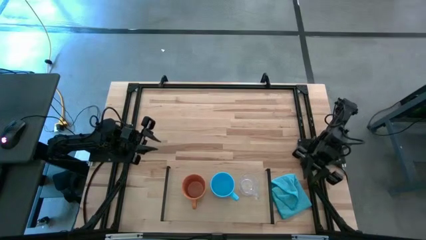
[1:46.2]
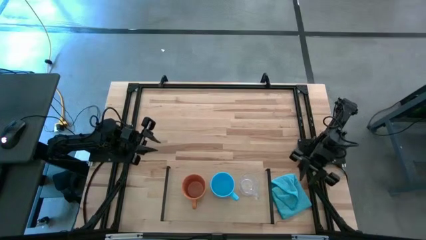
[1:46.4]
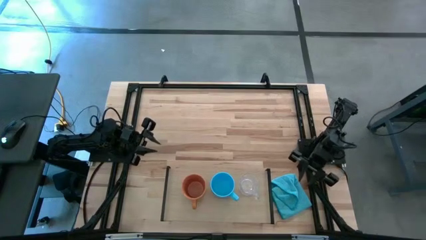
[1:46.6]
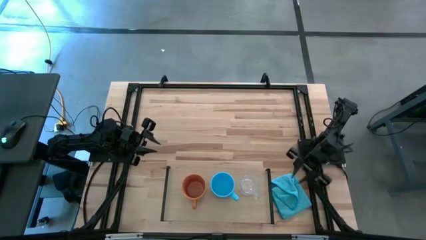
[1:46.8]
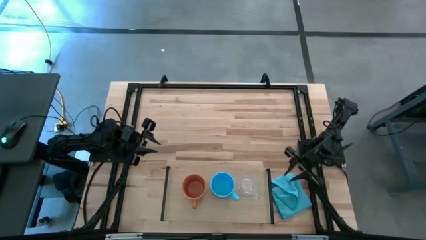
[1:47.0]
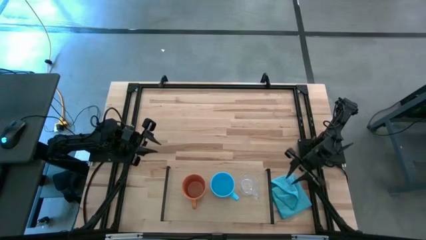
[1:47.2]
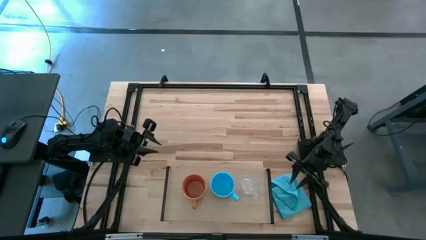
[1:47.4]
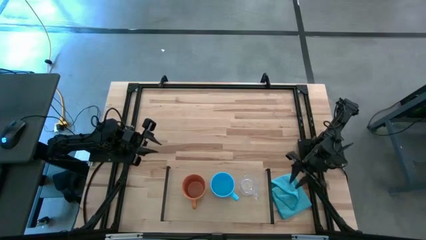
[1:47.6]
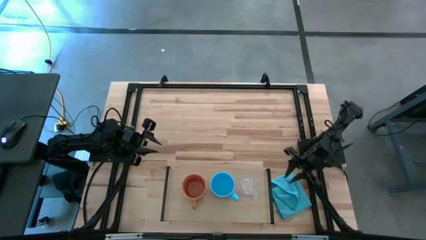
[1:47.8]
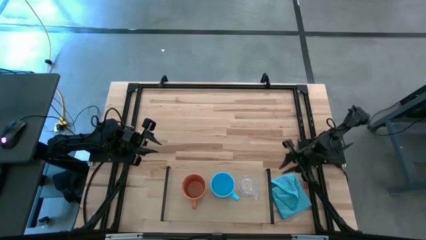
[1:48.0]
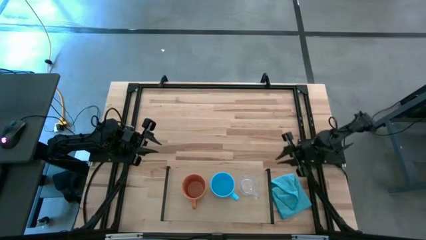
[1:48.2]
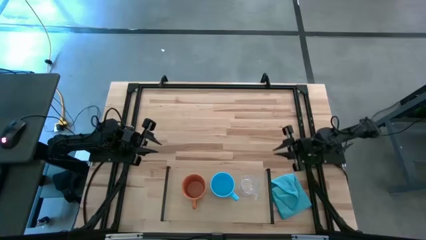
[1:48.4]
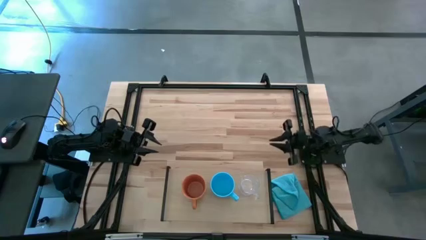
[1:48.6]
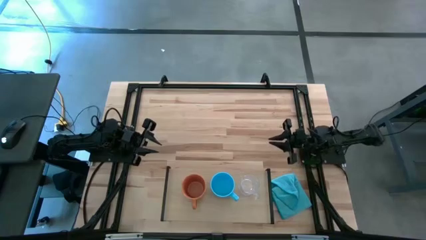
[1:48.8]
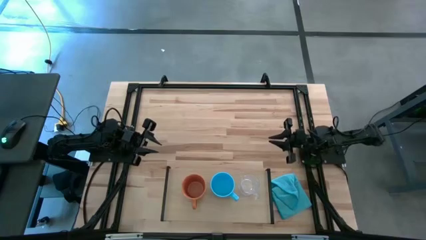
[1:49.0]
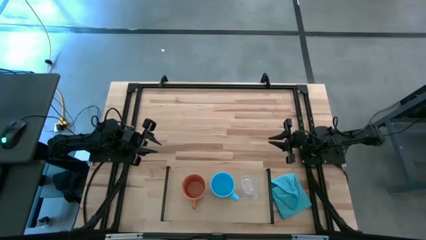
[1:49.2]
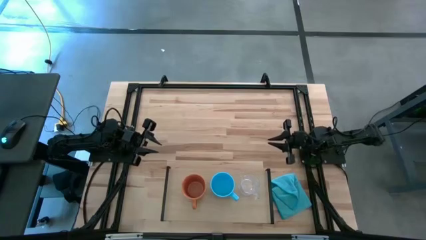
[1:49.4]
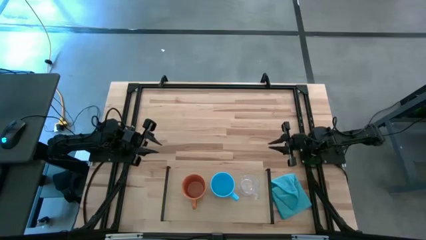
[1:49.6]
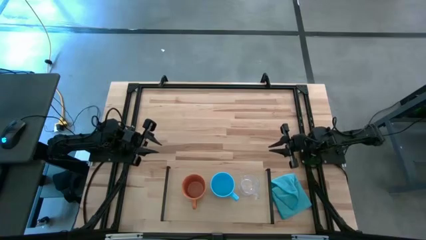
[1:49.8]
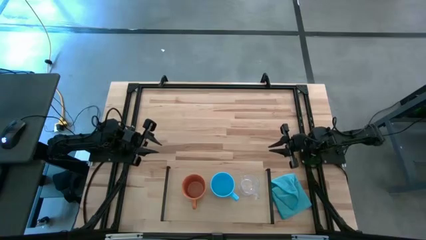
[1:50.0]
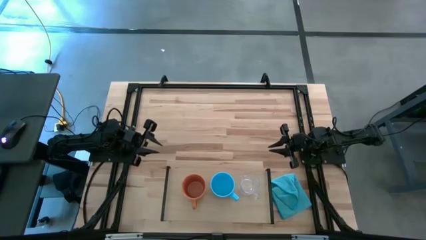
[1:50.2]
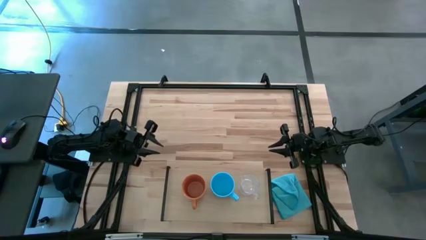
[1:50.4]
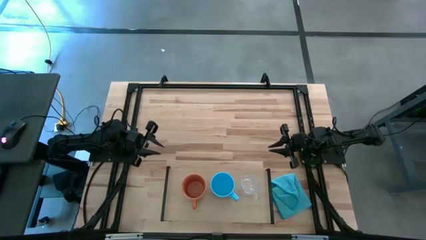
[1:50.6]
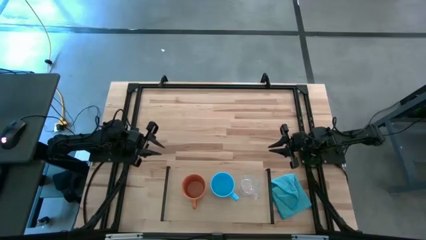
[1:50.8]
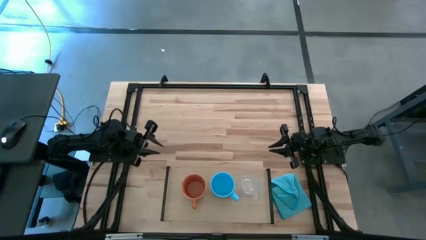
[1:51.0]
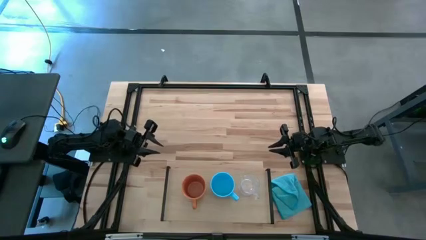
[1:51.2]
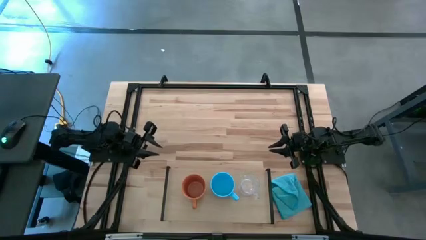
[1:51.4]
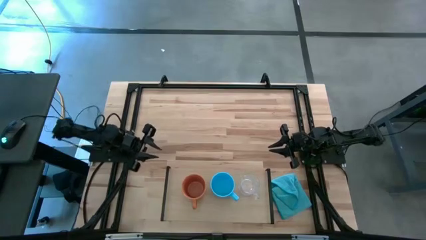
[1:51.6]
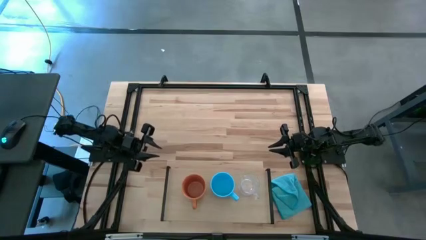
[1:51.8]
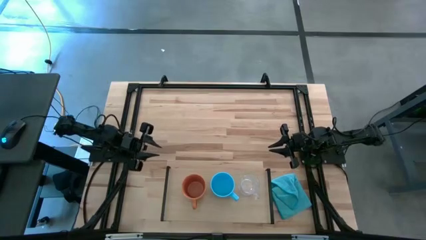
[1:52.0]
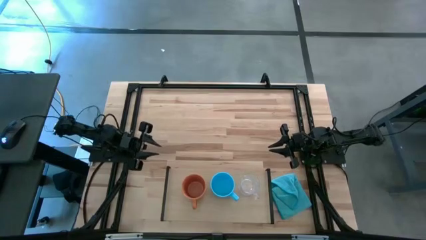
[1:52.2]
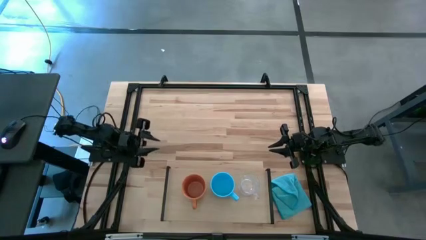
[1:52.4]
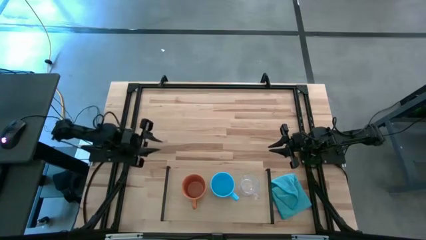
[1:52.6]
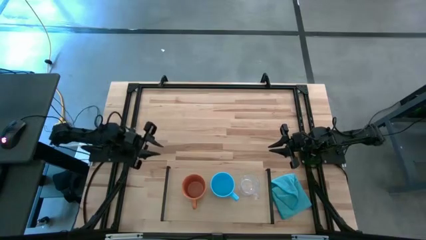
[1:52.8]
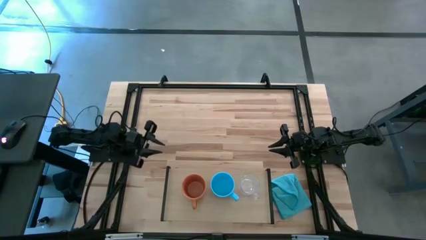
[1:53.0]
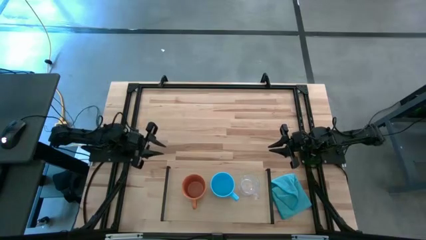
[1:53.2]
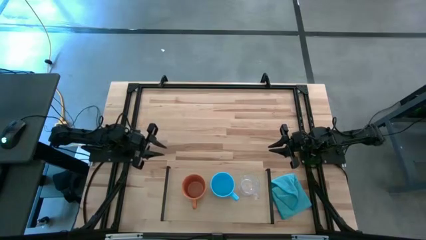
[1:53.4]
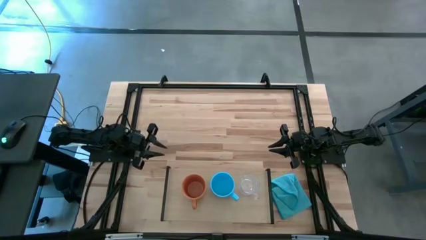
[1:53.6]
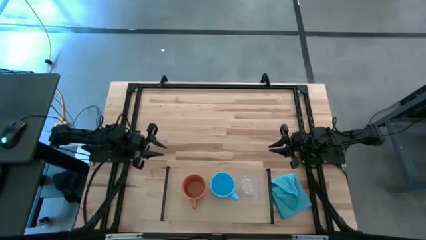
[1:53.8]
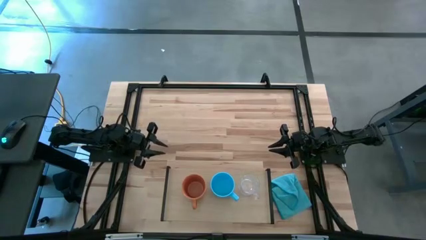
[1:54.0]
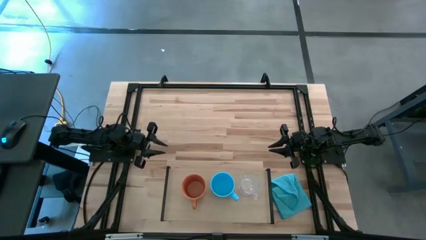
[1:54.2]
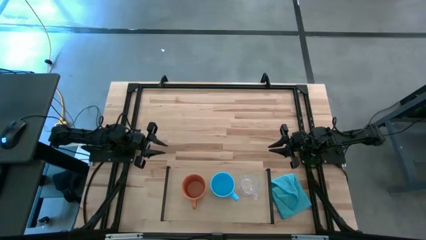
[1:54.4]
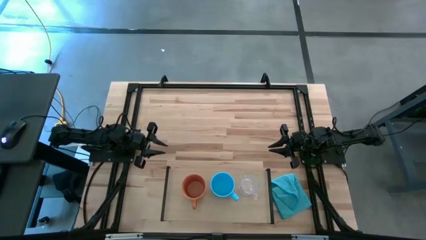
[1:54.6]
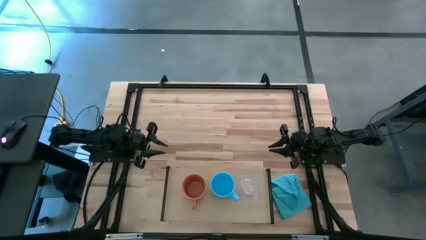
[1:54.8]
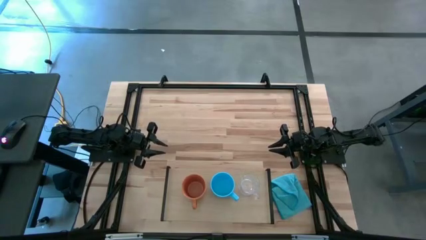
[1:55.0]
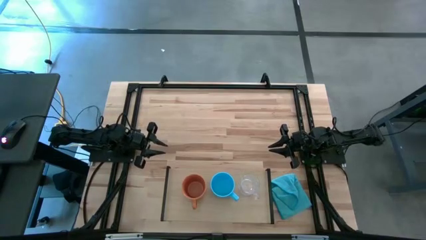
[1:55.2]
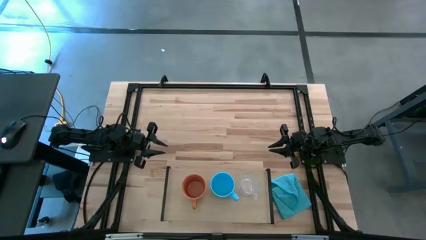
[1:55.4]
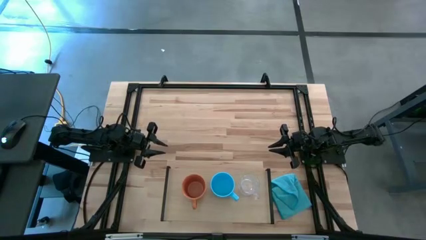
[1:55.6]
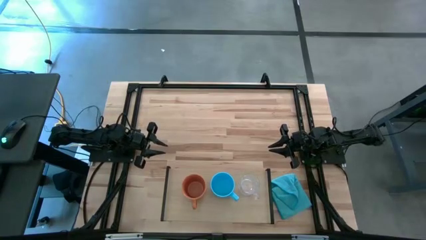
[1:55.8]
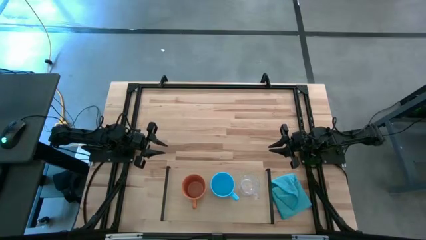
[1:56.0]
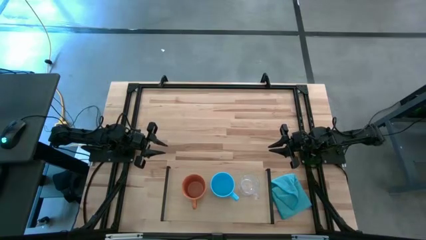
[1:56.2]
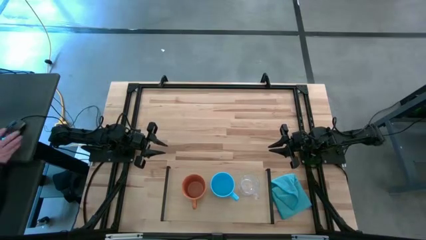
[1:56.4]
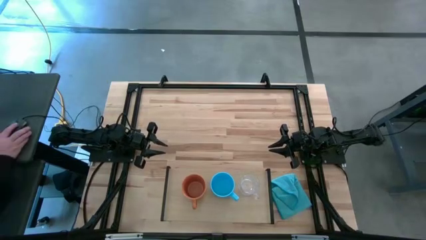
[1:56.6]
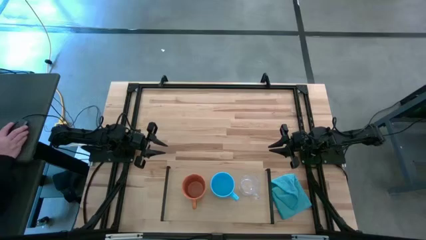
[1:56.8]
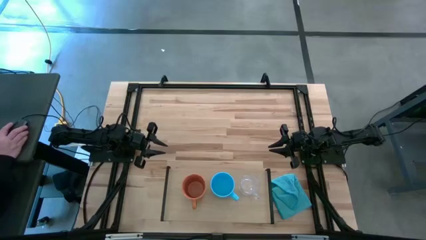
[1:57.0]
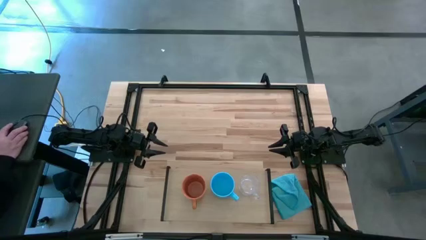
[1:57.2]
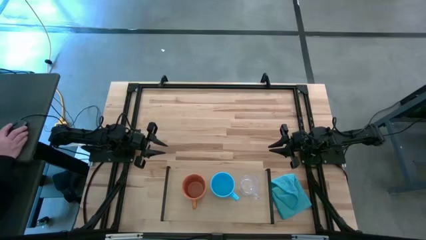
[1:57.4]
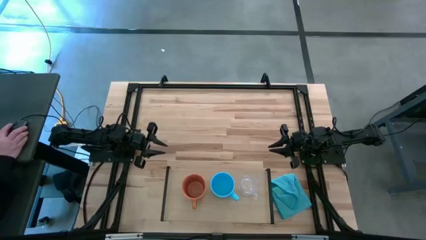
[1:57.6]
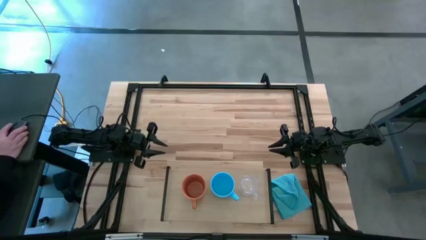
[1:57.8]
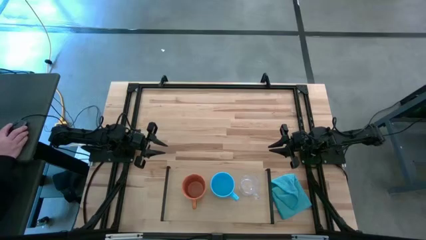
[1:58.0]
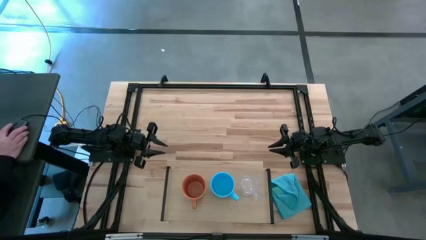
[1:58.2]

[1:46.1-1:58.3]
Task: Stack small to large cups/mugs on shelf
Return to Home Position

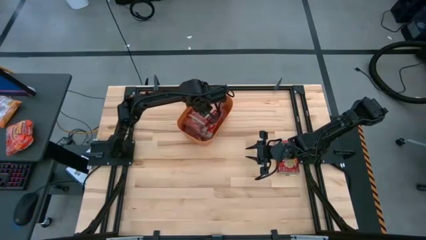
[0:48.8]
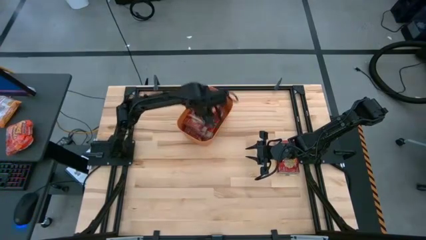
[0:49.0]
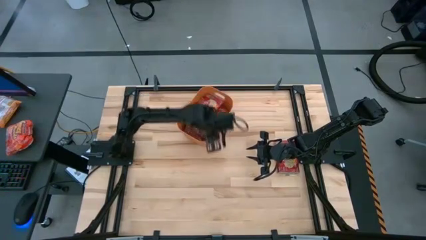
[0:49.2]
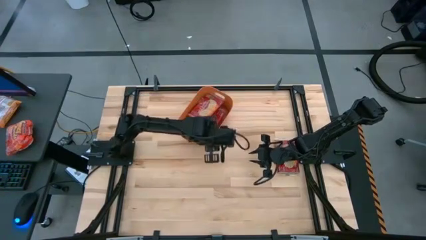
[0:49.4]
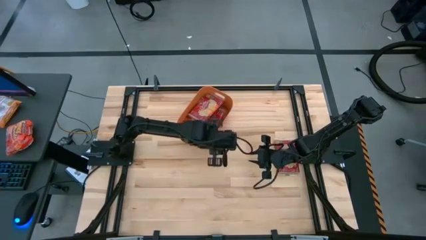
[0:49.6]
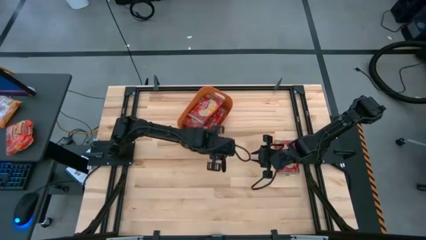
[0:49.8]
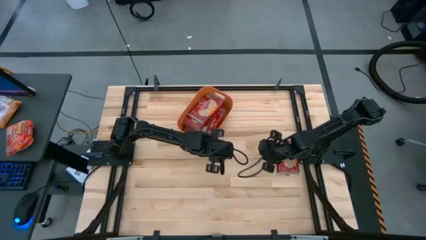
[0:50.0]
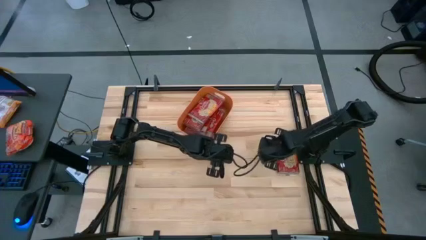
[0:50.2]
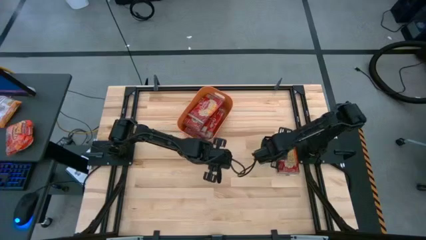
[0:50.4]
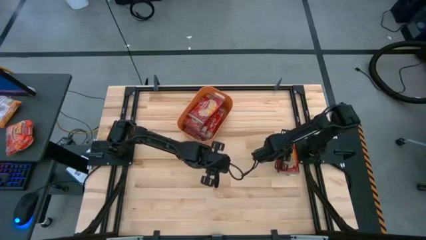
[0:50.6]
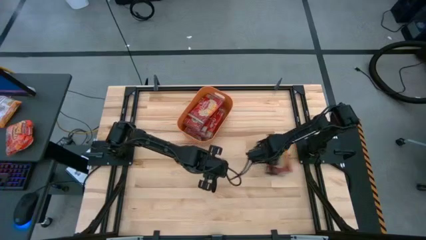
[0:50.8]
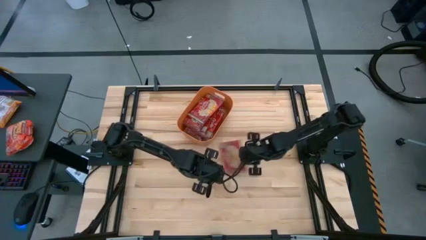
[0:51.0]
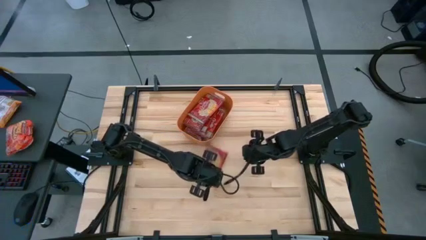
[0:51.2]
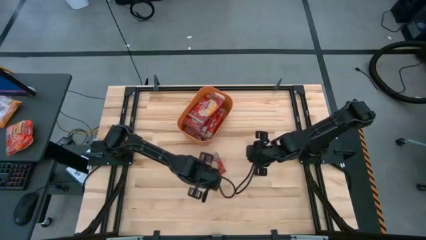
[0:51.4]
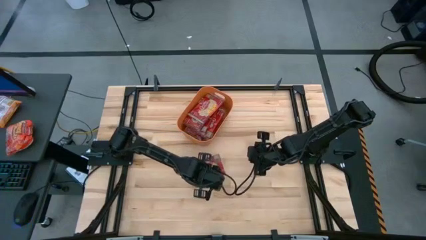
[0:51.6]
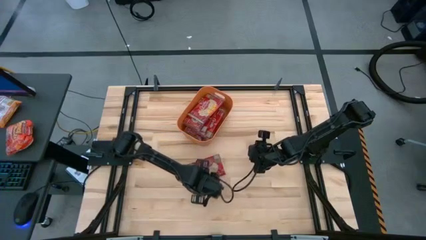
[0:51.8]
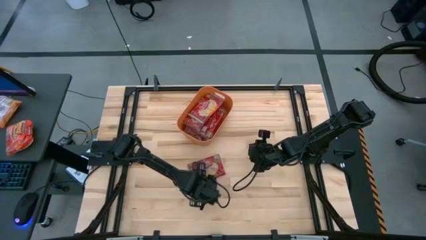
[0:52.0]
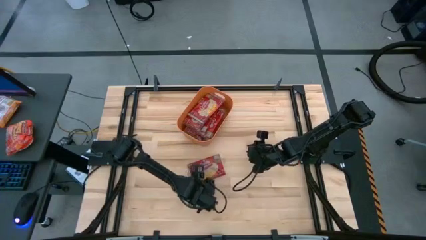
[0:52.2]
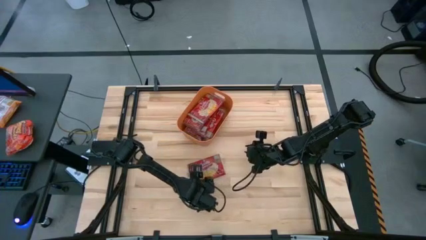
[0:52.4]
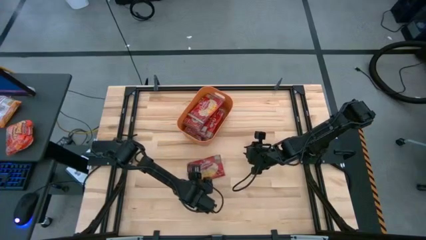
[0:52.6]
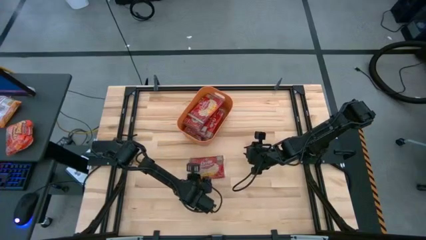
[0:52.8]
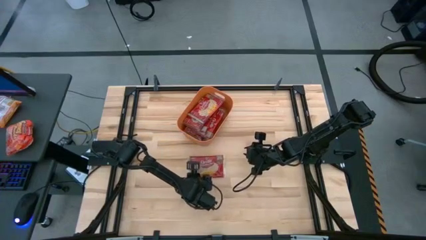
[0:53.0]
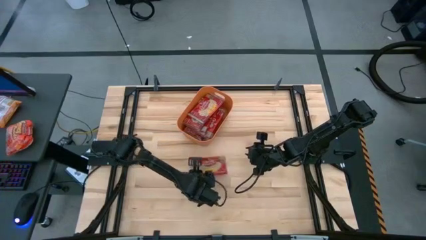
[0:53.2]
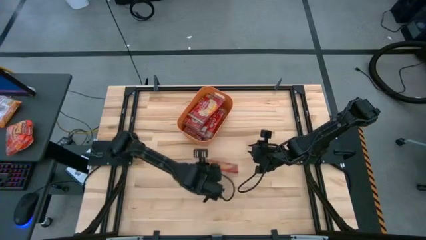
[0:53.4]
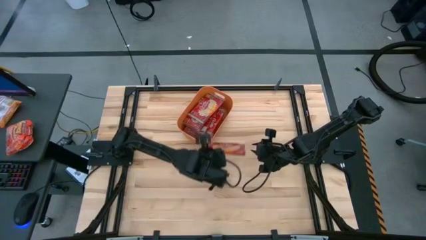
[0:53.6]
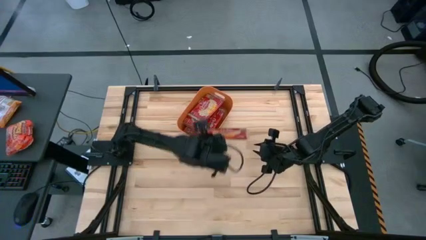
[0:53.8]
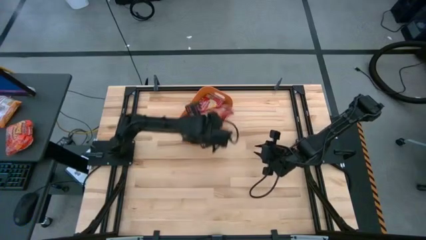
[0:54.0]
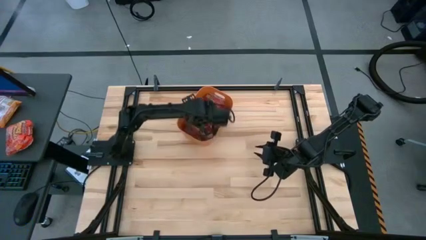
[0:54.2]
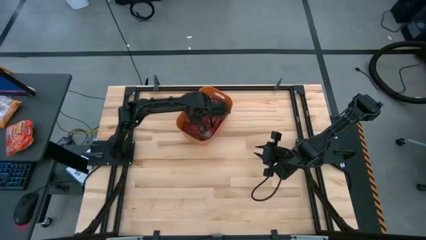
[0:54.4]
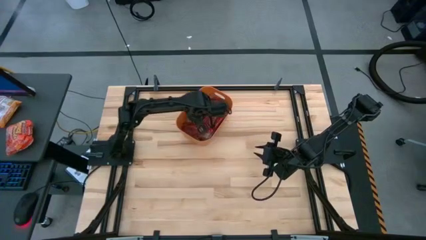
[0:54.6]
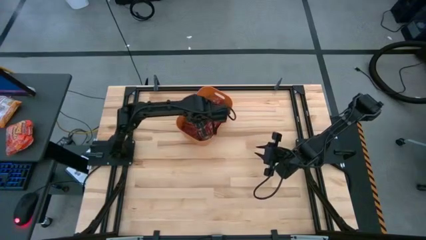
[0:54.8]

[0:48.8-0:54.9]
Task: Sort popcorn bags into baskets
Put the red popcorn bag into the orange bin
